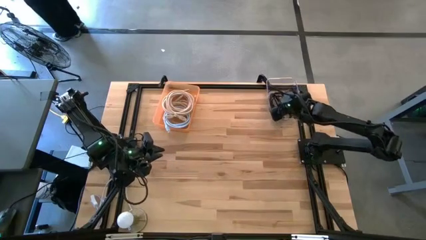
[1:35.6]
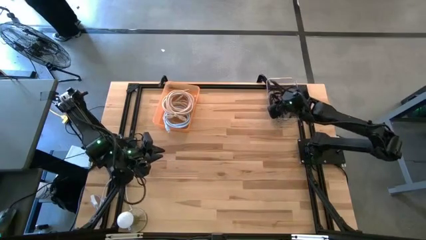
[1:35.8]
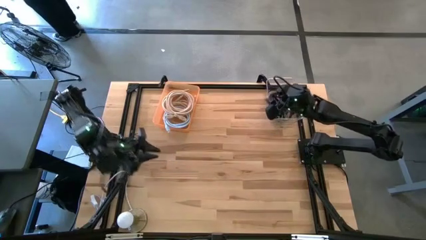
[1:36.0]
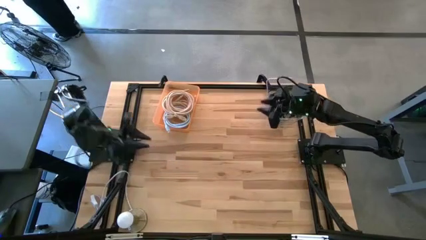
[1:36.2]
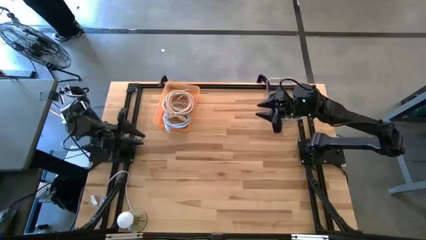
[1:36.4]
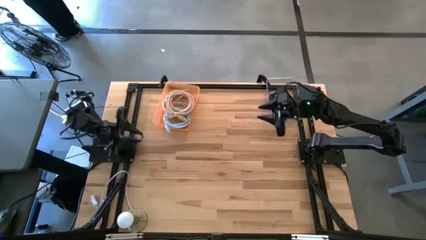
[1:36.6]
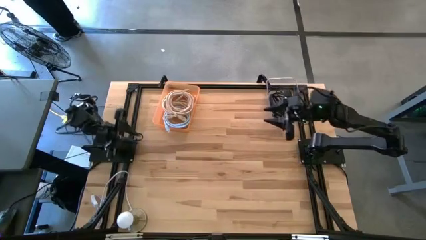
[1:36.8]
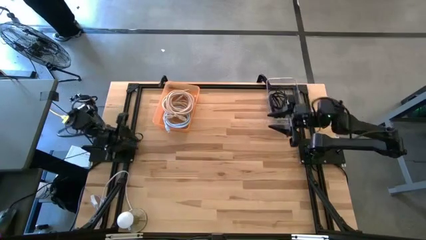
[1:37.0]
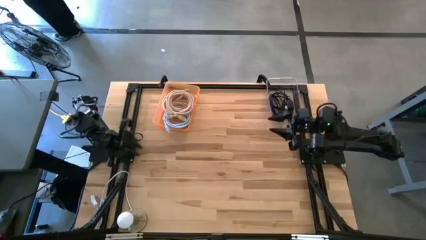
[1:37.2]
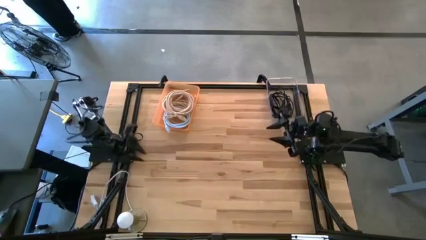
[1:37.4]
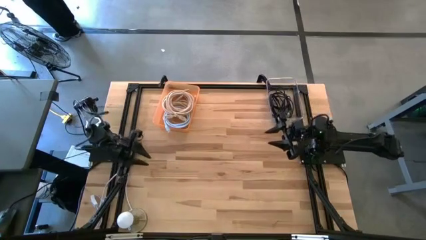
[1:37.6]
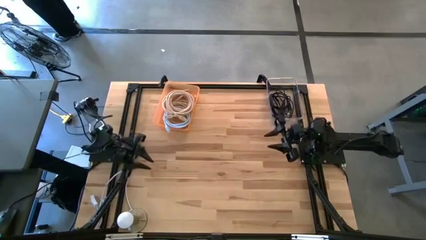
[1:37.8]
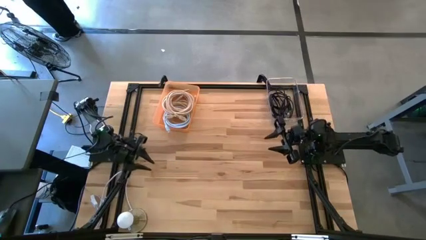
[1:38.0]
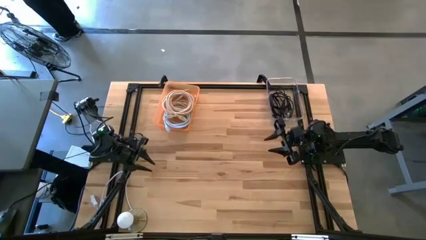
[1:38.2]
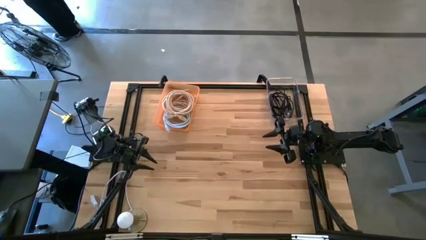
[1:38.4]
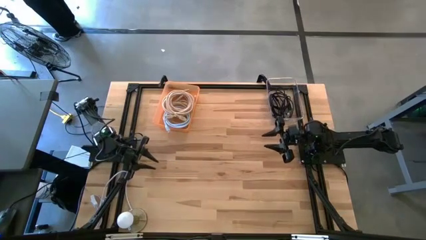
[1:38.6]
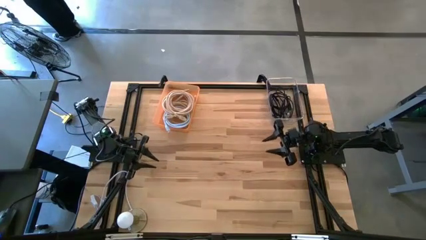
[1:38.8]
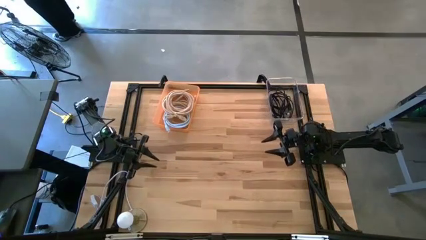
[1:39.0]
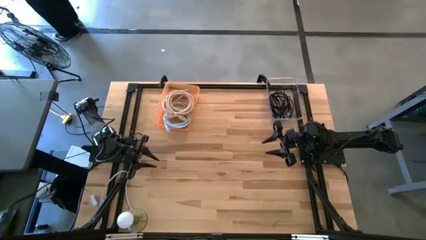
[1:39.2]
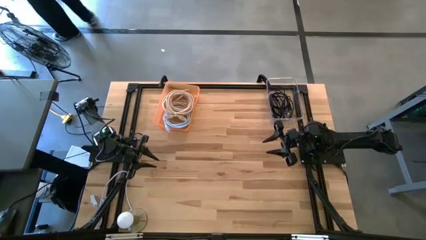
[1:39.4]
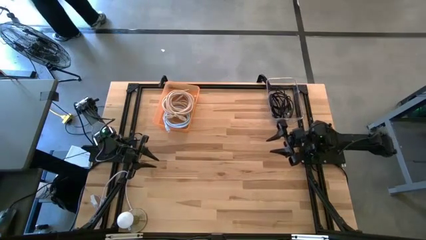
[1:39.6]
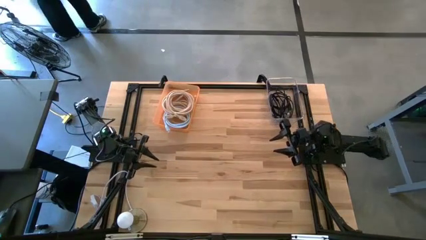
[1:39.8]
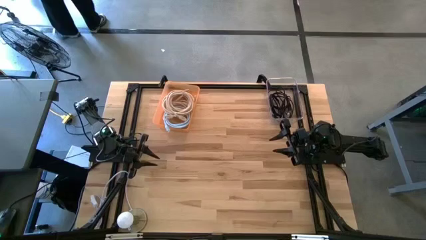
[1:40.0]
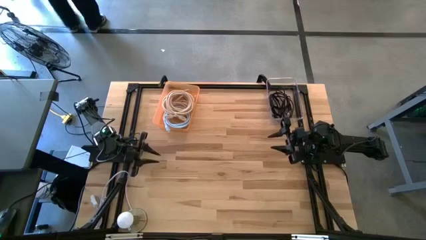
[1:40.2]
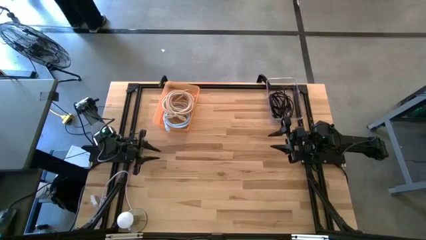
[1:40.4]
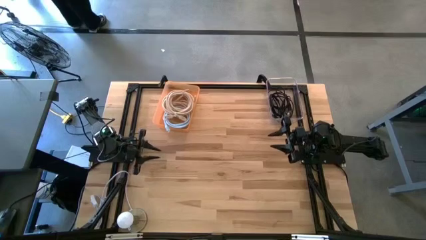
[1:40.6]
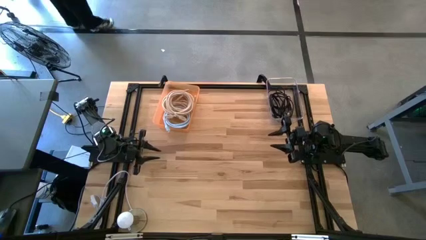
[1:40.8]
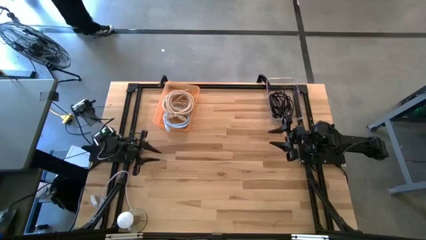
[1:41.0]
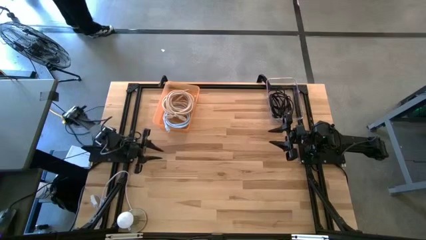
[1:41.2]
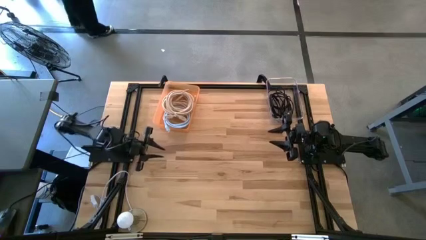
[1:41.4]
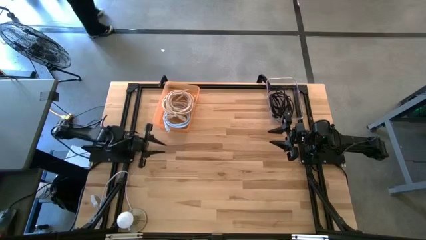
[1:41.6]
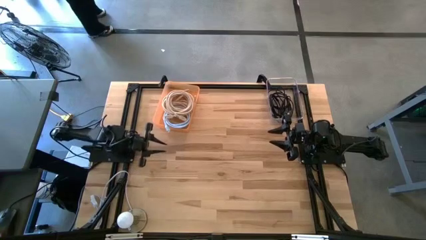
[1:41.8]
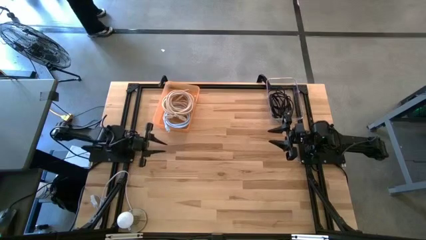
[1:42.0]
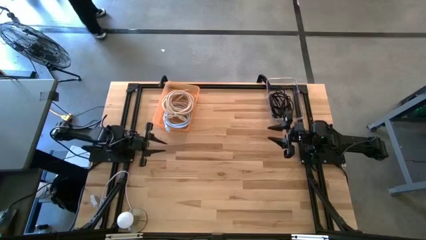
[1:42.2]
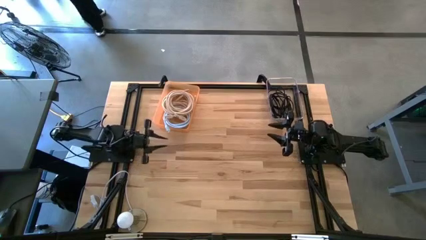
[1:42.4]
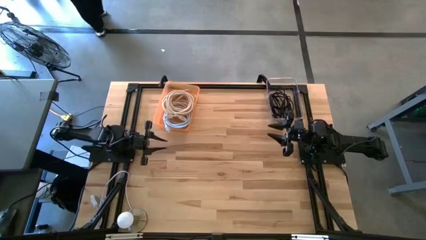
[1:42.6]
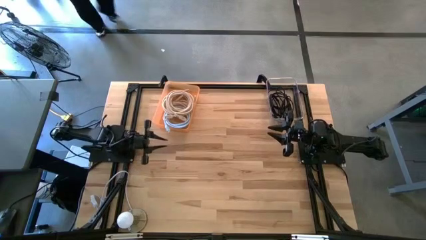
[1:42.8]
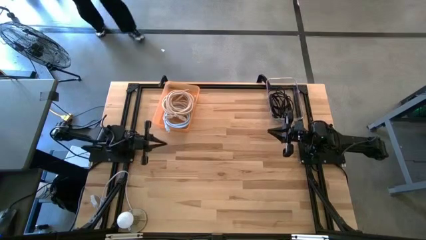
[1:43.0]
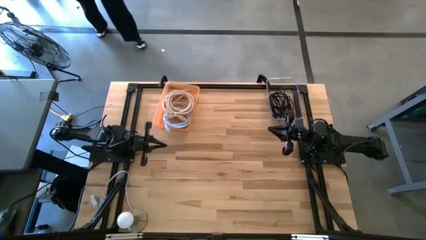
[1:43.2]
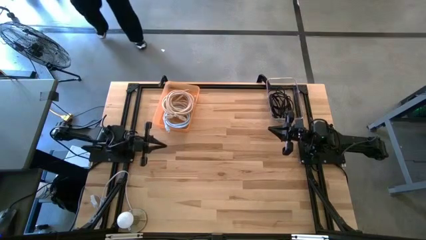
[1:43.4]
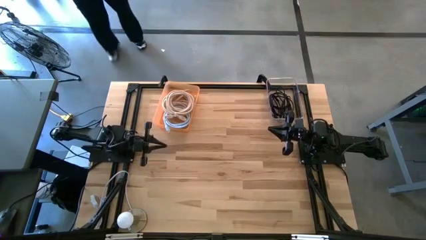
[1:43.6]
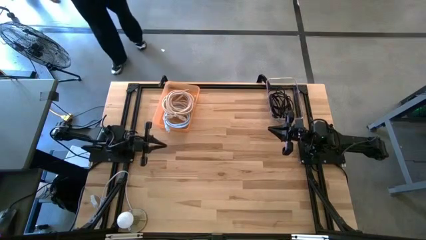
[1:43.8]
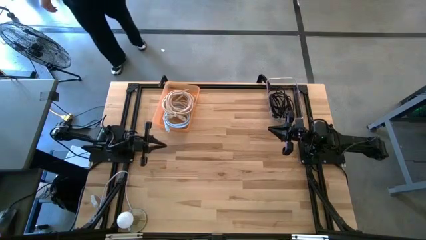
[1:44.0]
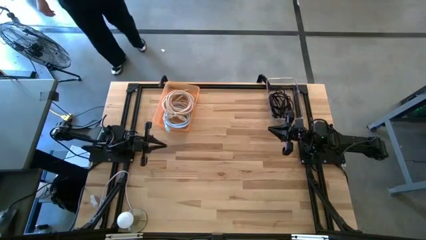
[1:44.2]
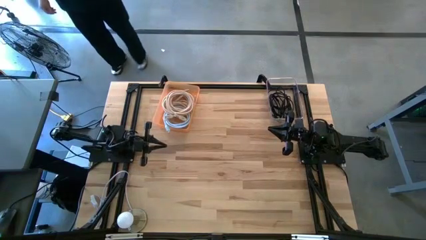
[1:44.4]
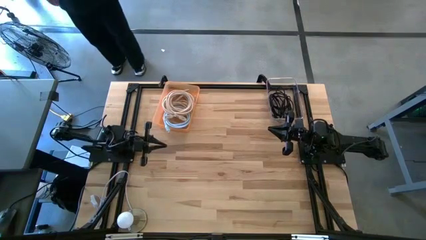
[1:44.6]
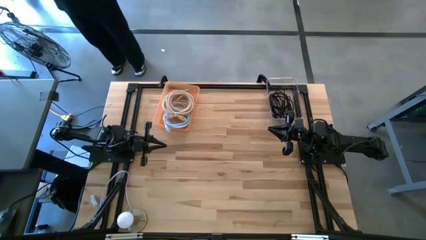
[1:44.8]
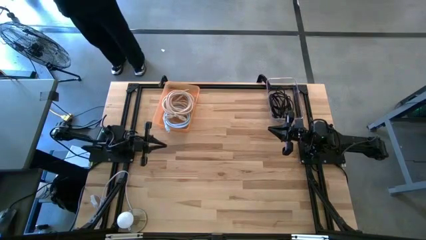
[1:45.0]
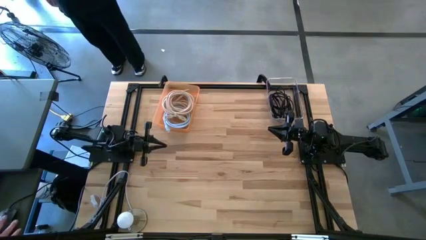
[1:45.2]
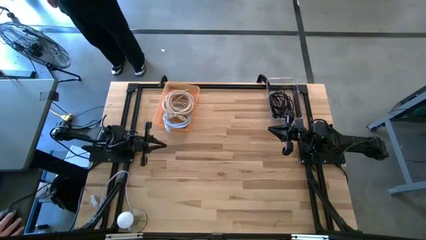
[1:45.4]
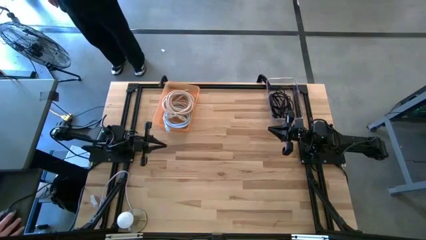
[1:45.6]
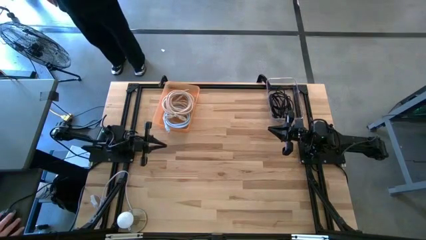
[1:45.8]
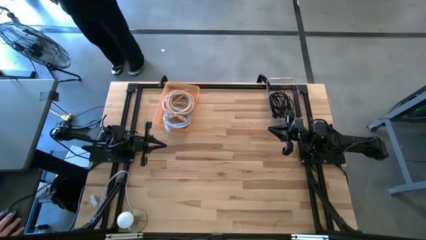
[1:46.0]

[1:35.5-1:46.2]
Task: Pick & Place USB Port
Return to Home Position

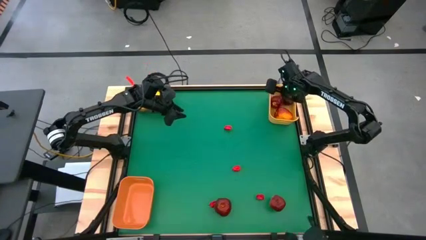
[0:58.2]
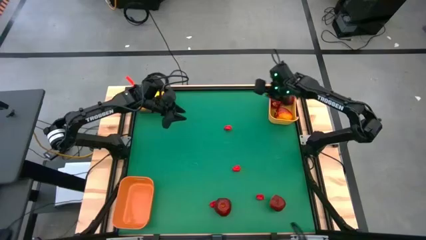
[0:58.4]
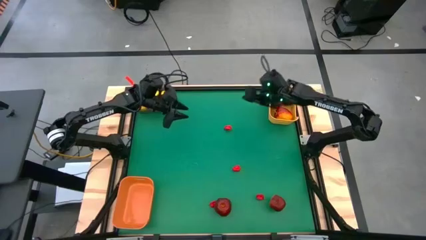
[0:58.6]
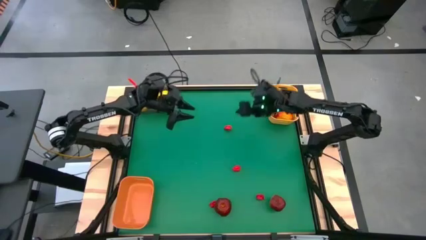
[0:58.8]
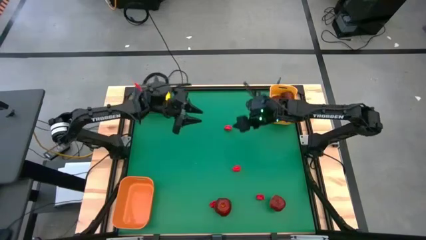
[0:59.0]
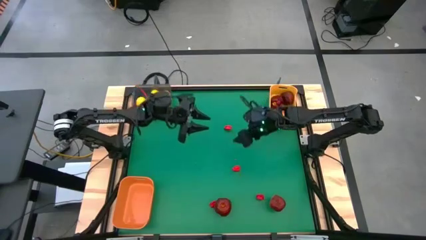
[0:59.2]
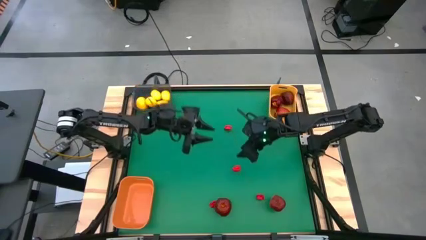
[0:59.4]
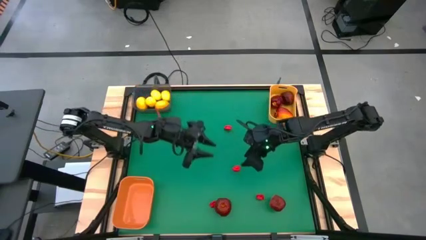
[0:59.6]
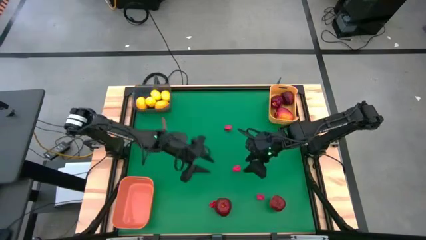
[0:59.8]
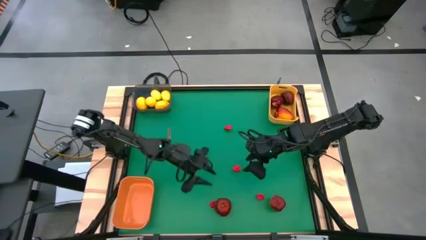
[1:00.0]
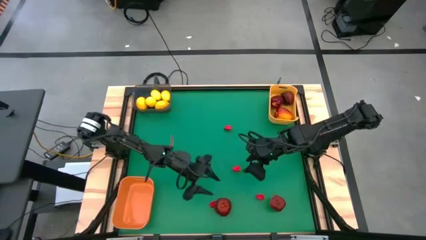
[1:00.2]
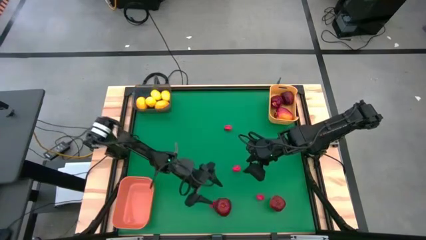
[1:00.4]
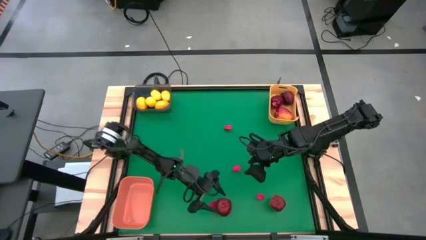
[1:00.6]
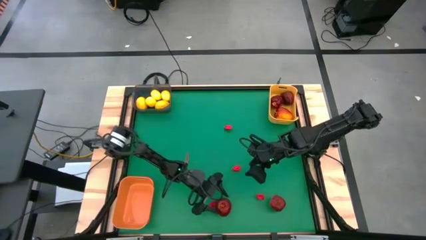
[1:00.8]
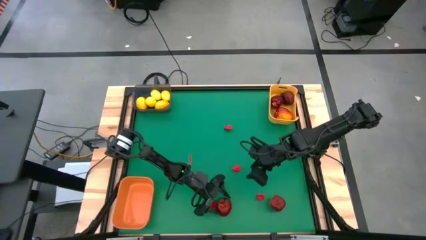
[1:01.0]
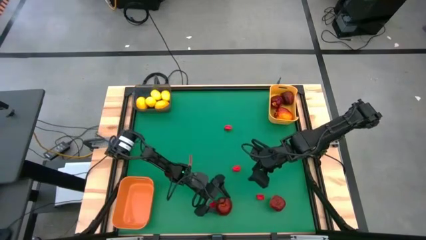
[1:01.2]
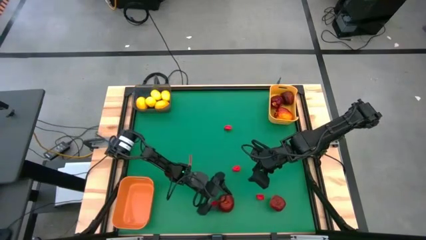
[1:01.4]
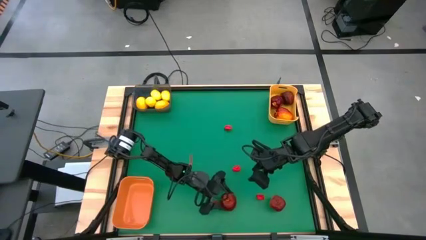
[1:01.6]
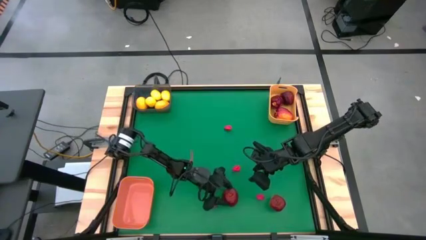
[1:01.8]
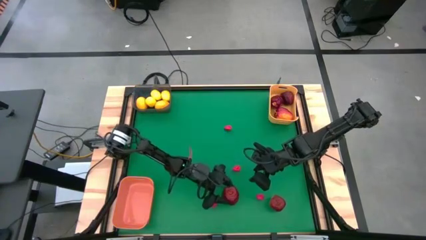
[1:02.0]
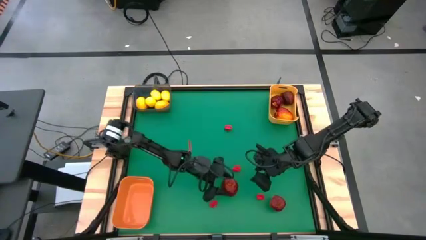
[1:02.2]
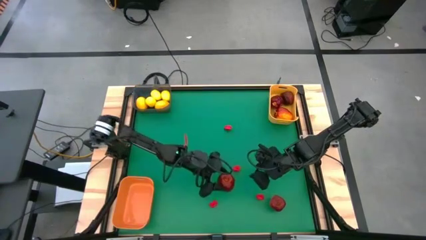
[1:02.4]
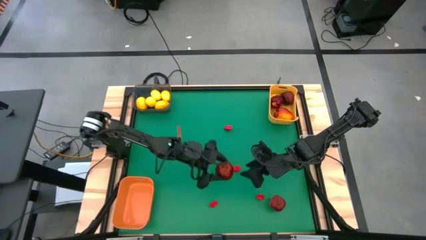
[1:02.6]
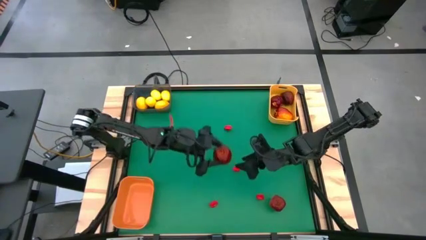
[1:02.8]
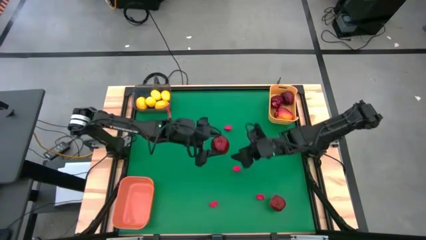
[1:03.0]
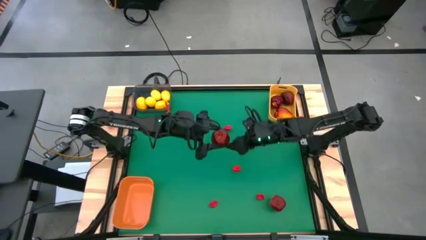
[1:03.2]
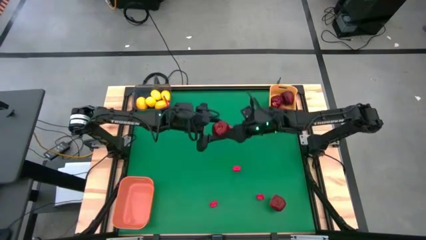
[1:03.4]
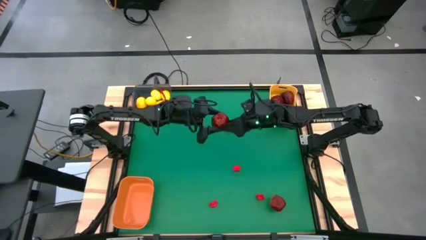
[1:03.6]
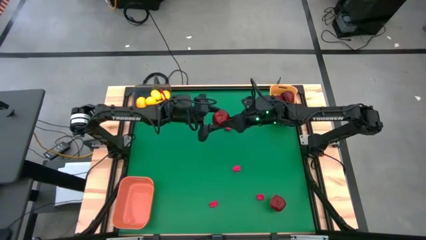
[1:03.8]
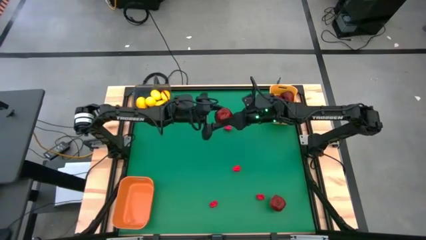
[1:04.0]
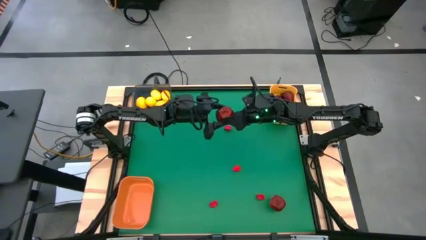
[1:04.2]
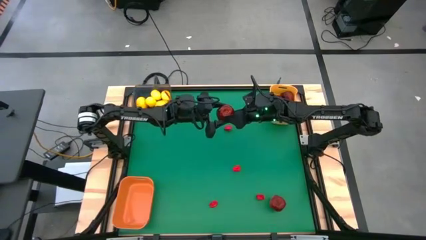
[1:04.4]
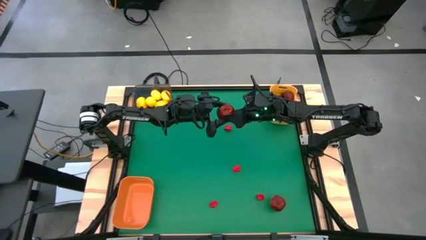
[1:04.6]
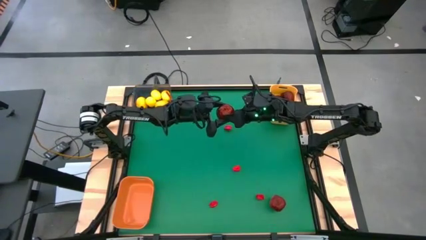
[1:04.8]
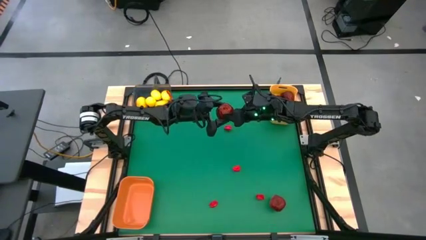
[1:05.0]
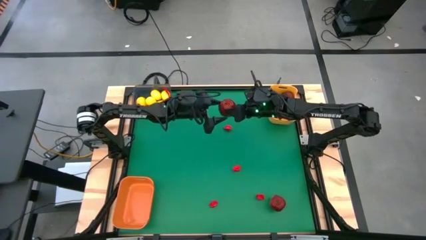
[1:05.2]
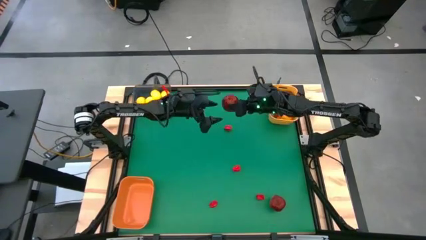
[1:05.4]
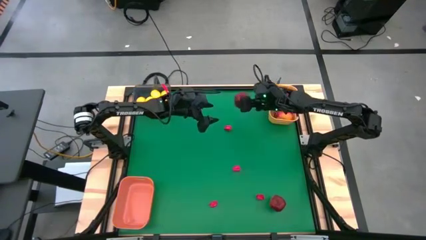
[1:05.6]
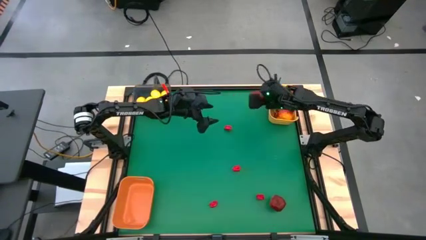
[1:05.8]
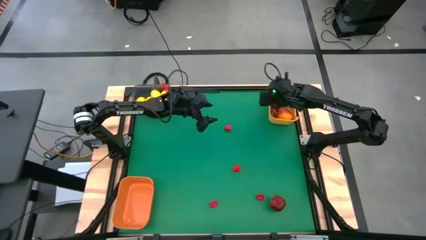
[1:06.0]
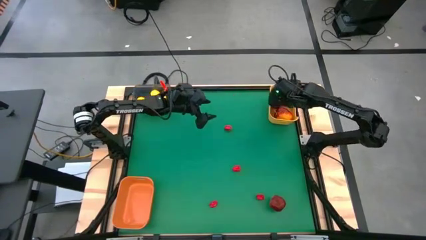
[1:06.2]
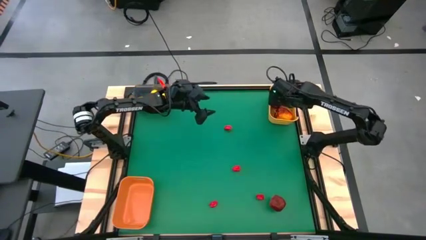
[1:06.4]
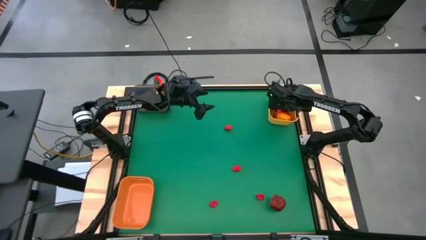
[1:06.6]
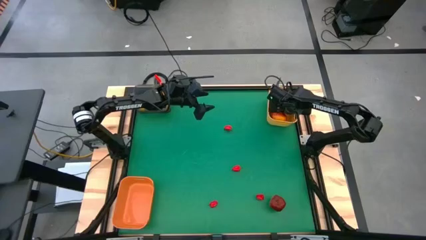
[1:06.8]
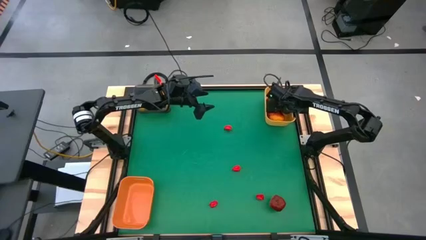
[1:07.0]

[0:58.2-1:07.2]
Task: Sort produce into baskets
Put the left red apple into the yellow bin
